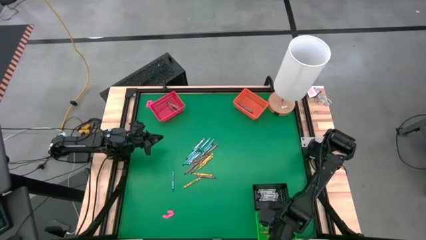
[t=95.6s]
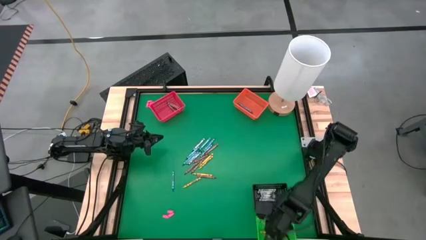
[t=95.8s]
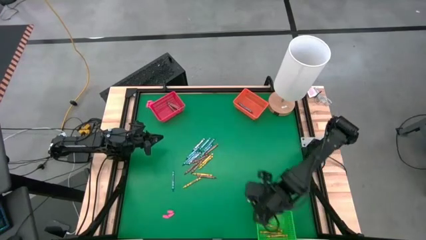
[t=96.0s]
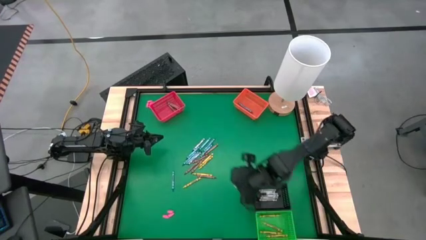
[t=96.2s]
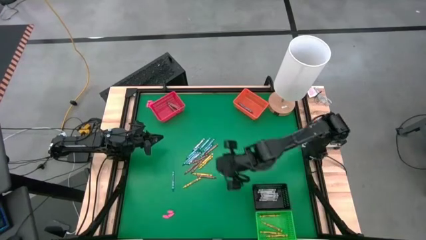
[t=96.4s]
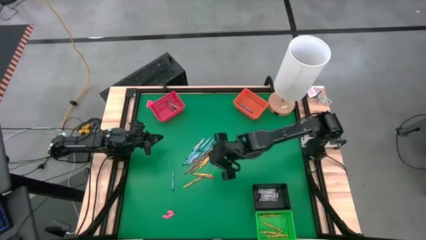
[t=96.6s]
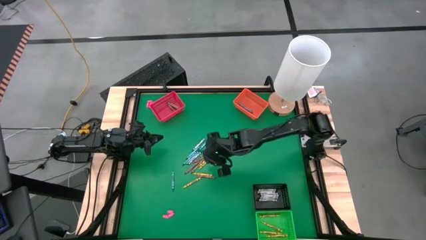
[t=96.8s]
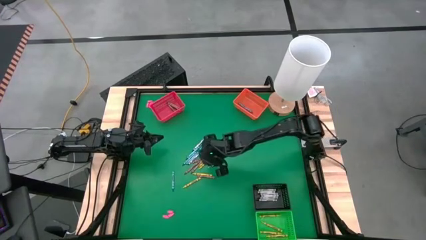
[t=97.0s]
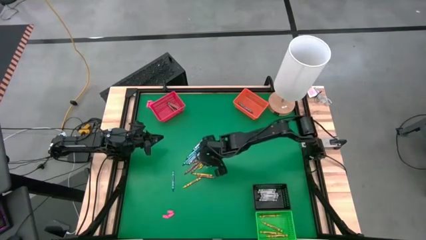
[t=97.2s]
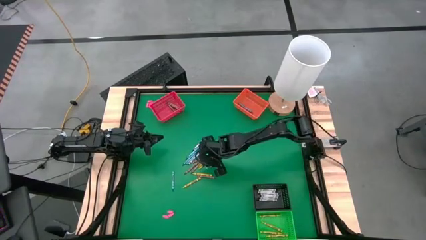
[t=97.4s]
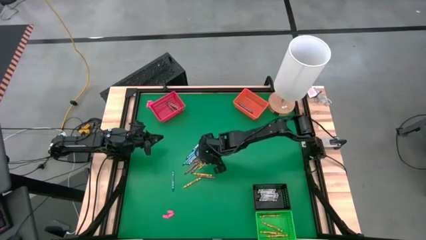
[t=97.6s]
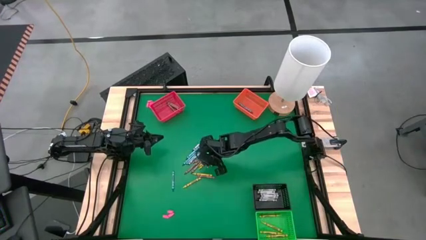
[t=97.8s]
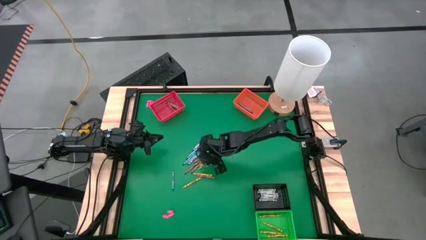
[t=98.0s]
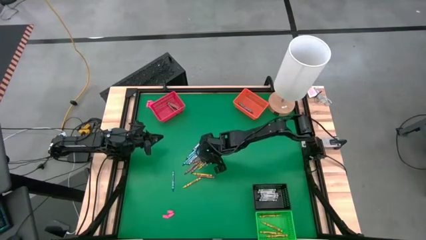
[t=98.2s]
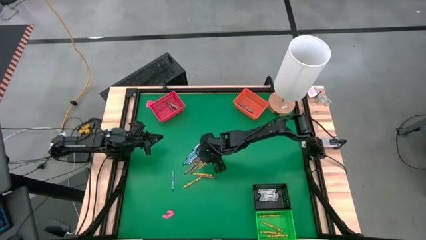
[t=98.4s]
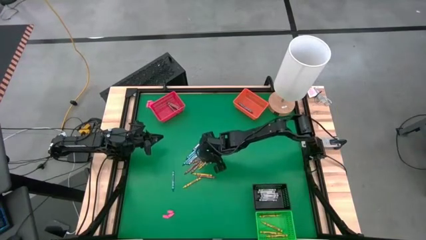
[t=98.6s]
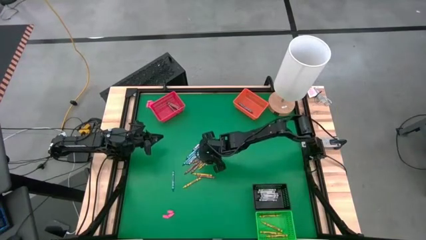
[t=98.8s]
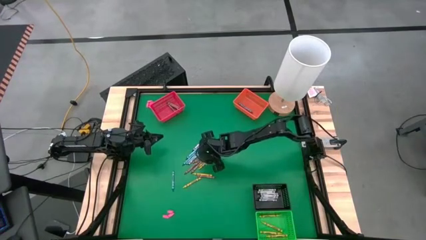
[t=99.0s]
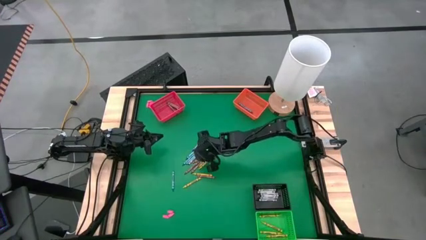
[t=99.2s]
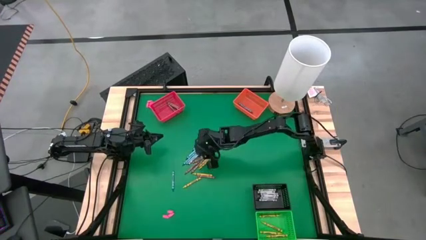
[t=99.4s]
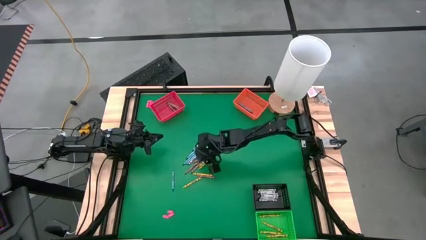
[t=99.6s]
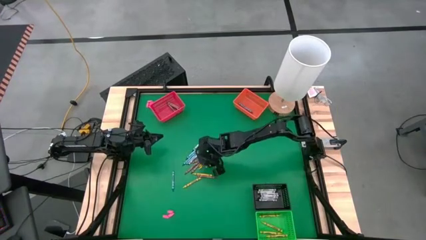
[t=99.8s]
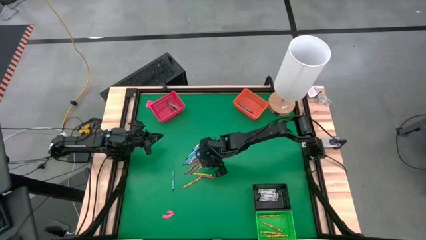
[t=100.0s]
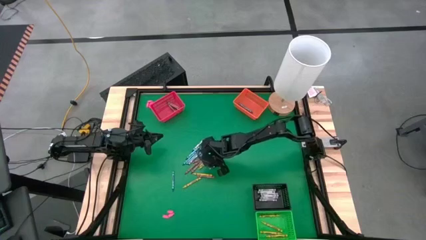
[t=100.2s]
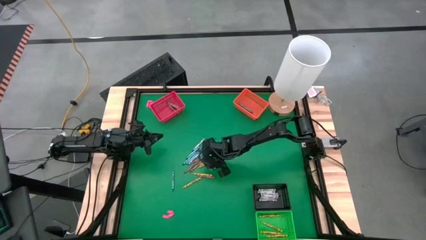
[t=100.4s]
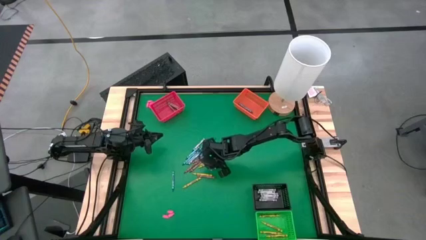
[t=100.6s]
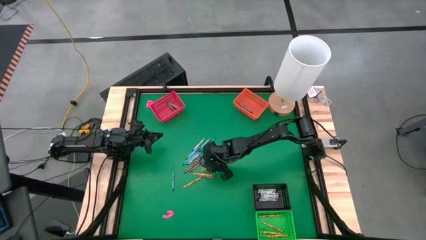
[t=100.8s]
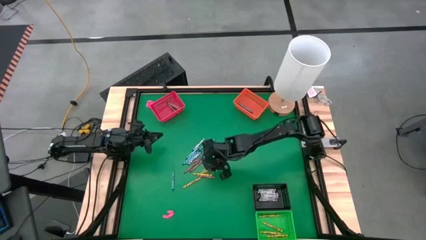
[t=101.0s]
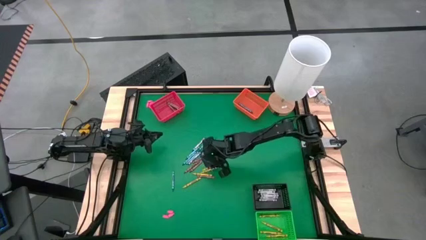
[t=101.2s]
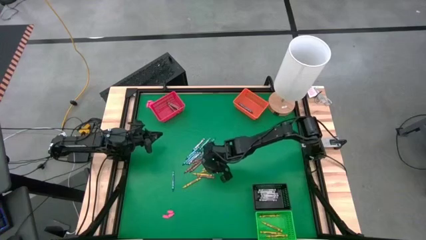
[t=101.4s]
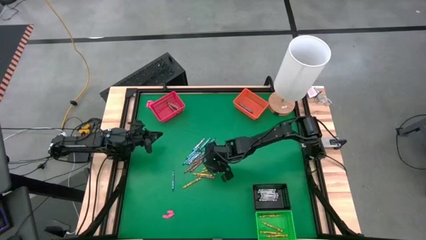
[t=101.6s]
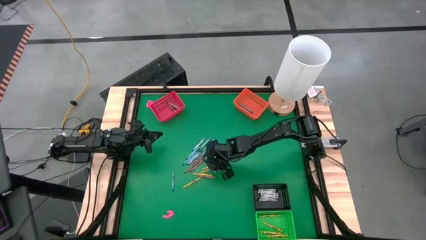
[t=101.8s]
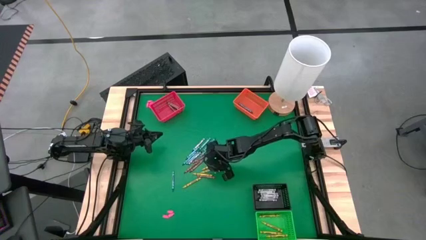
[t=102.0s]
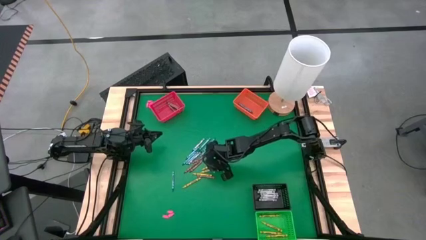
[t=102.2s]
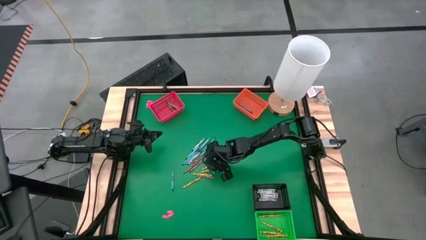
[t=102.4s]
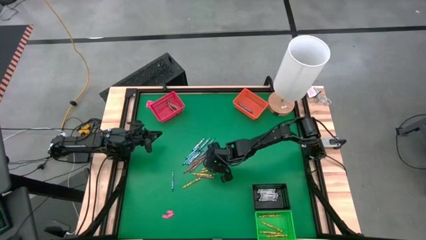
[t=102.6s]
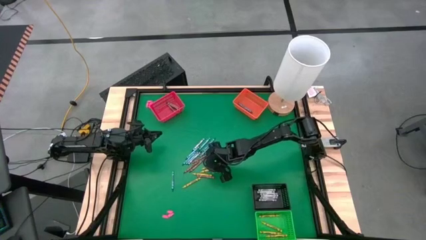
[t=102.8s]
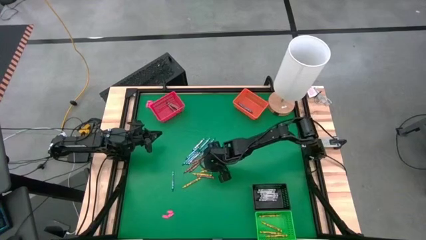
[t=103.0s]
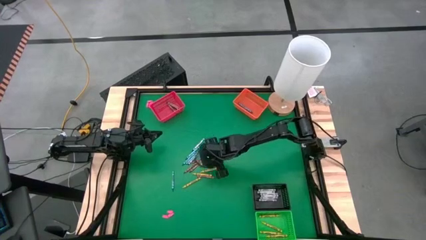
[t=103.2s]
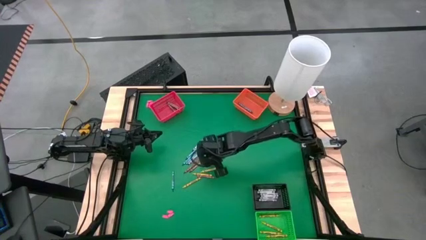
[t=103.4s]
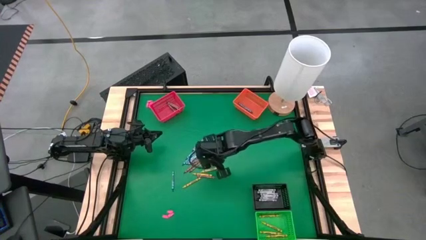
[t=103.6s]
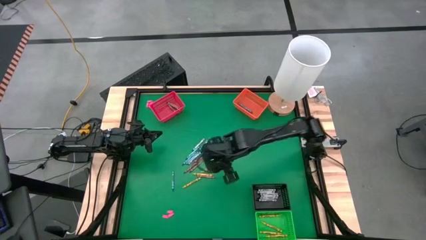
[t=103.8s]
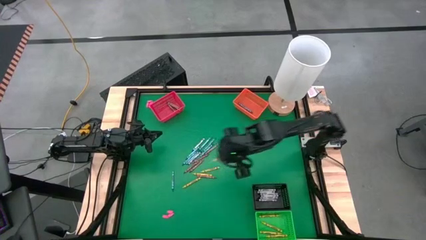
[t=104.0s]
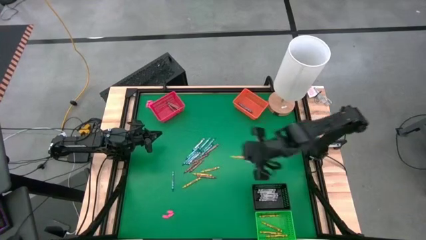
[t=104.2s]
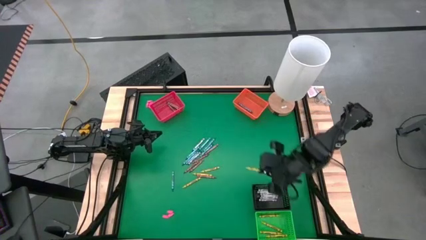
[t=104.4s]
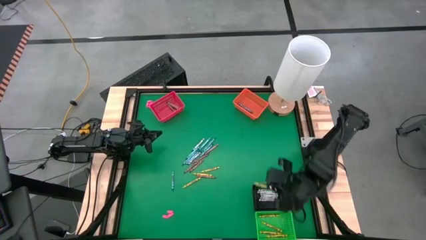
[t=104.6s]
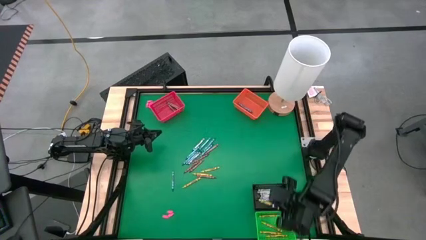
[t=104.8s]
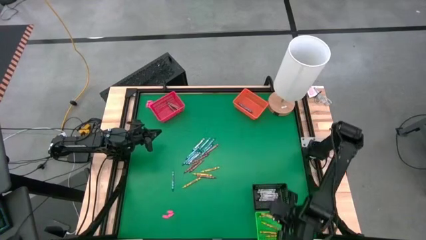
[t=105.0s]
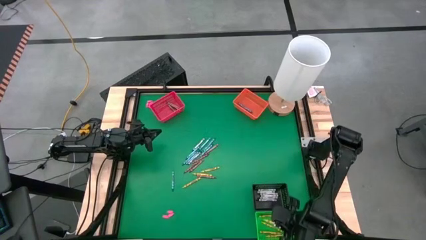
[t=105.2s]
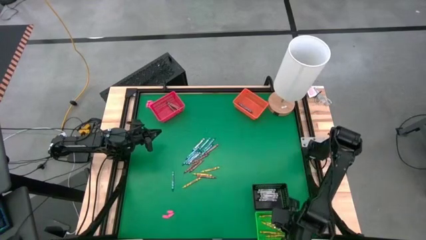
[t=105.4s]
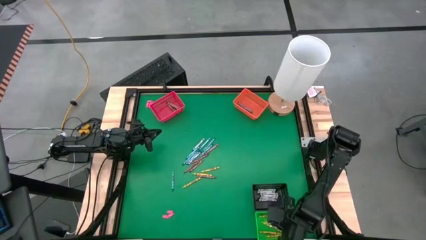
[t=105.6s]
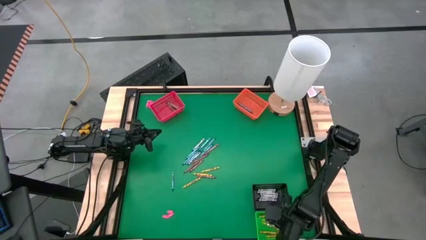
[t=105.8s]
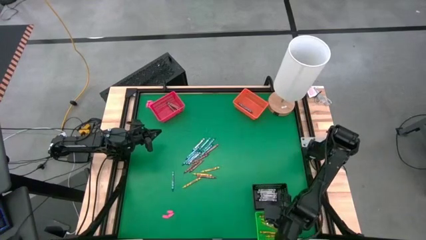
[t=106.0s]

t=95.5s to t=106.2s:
Task: Sort crayons
Put the yellow crayon into the green bin

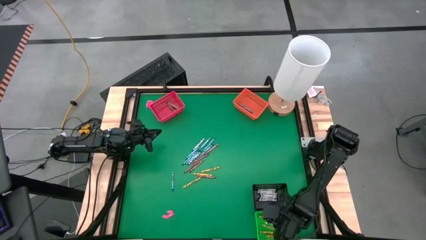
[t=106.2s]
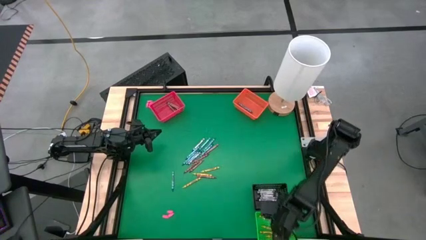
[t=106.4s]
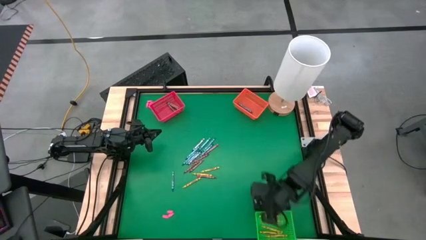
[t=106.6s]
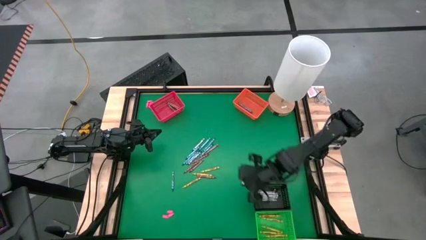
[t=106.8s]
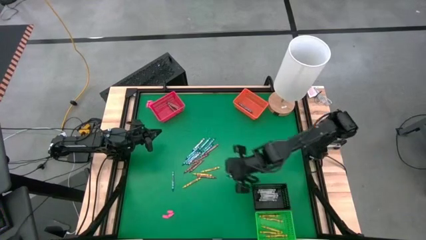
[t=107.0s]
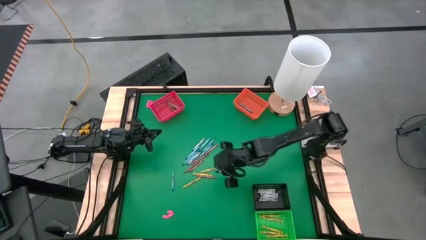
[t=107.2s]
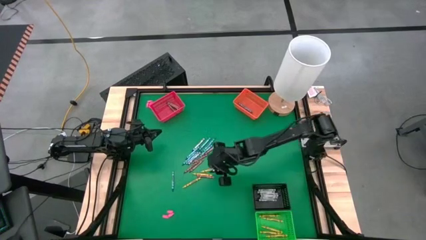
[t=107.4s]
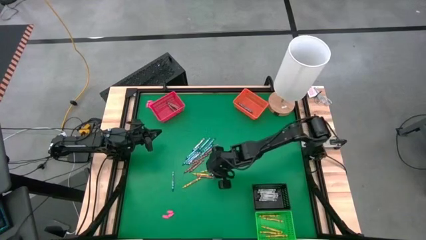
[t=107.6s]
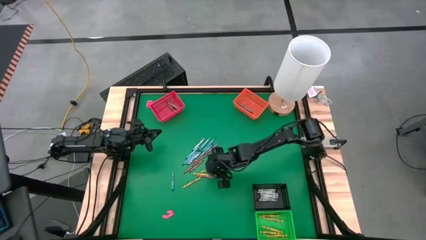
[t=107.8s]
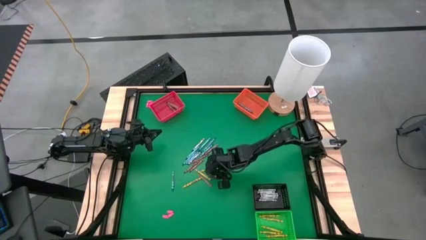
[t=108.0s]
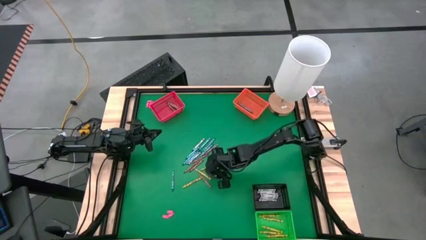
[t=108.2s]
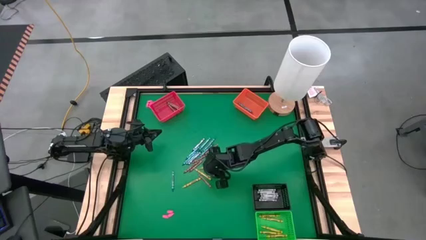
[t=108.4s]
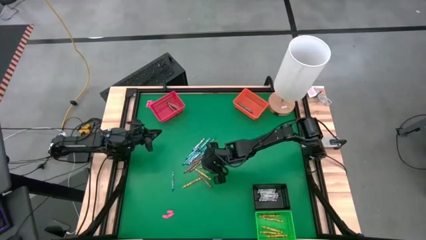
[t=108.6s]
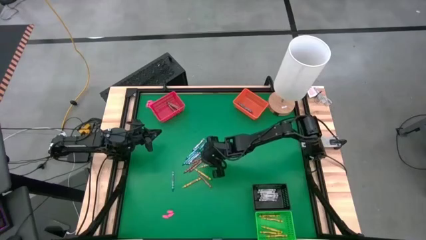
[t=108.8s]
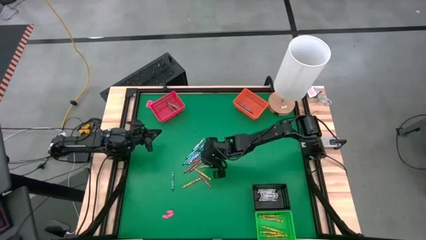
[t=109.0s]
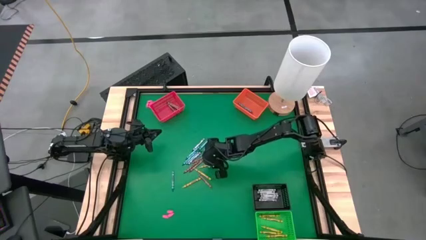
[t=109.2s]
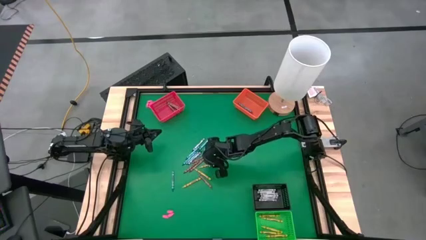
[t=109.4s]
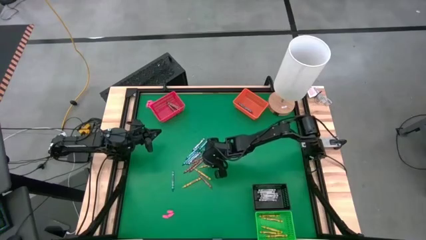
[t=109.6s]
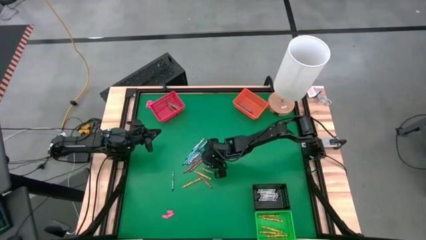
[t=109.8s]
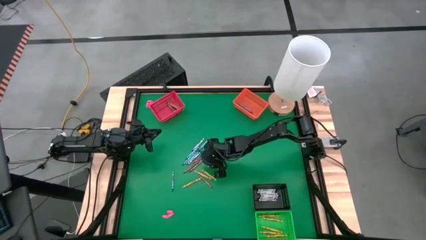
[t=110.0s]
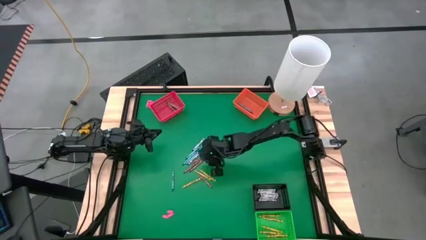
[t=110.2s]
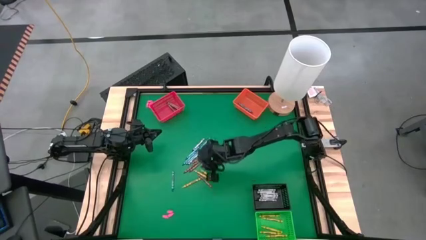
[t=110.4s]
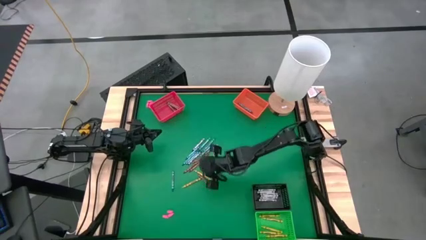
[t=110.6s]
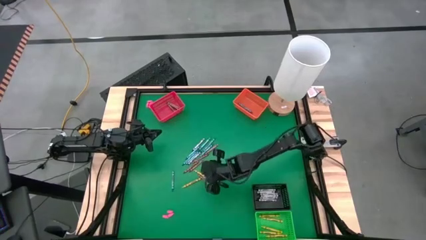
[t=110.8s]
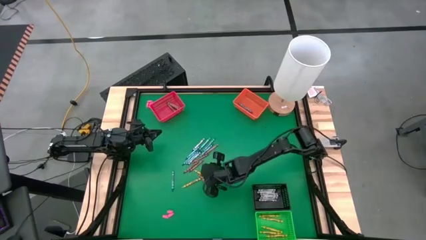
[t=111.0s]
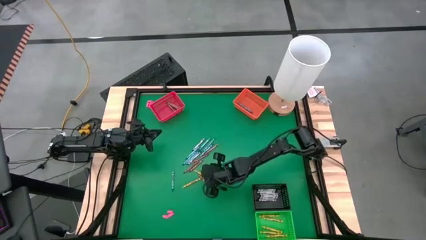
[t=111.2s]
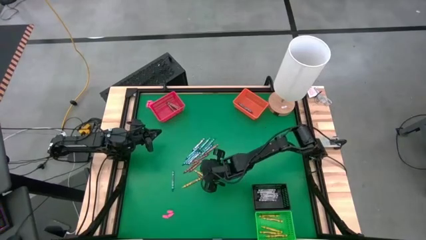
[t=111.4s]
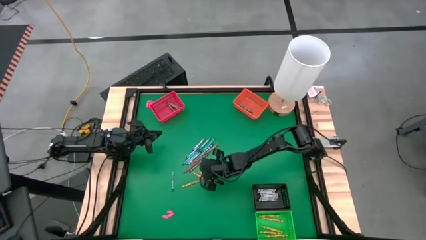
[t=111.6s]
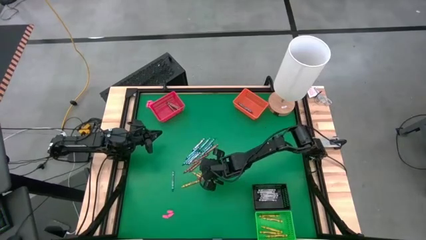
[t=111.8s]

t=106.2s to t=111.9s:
Put the yellow crayon into the green bin
